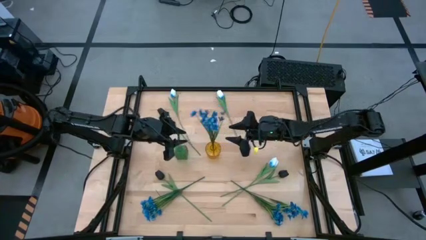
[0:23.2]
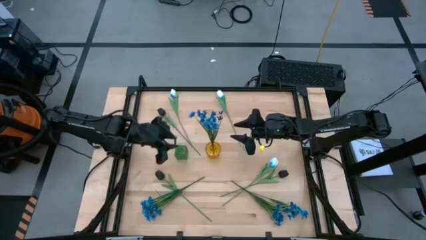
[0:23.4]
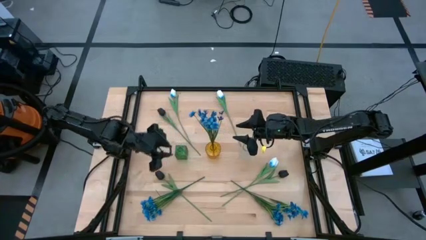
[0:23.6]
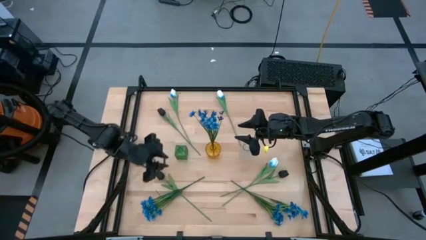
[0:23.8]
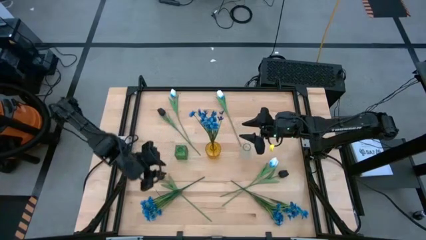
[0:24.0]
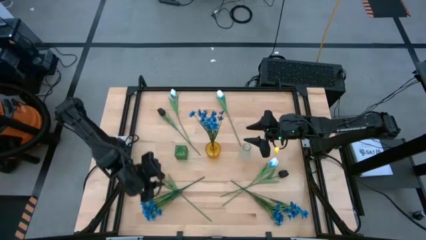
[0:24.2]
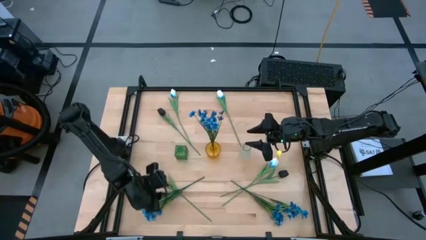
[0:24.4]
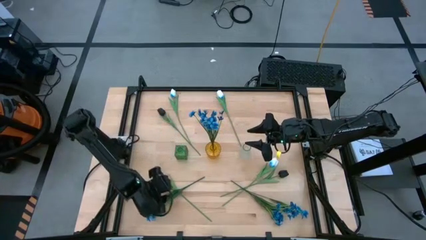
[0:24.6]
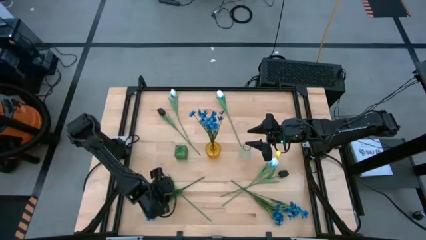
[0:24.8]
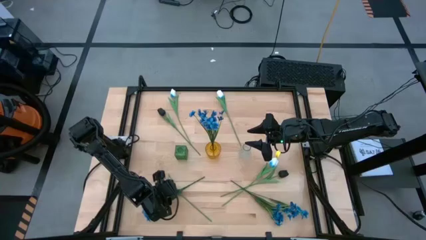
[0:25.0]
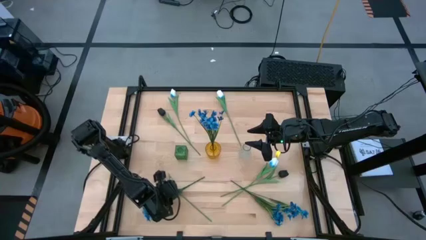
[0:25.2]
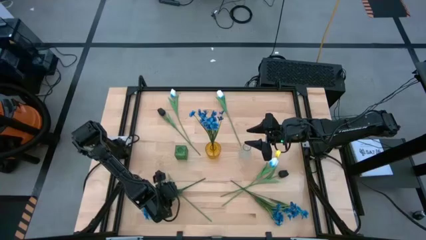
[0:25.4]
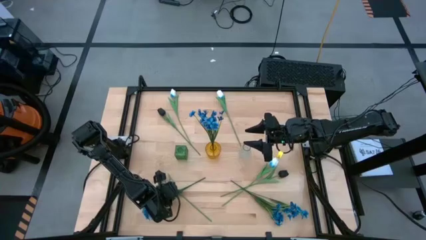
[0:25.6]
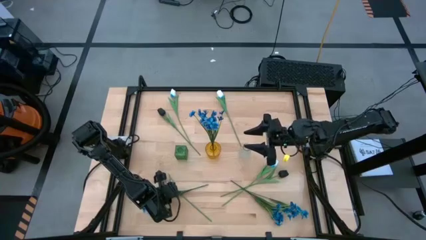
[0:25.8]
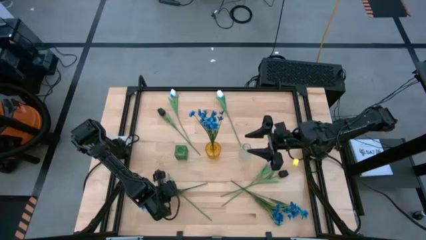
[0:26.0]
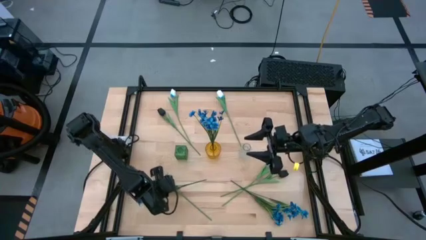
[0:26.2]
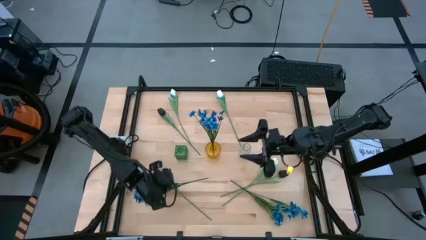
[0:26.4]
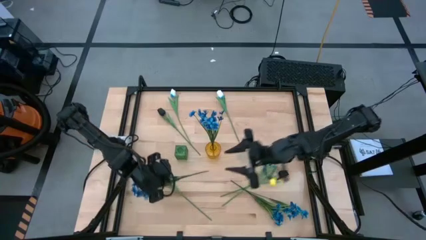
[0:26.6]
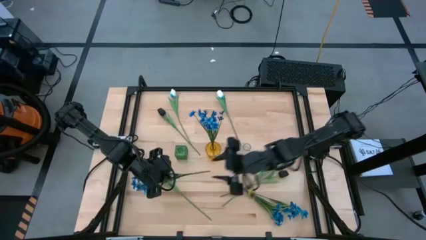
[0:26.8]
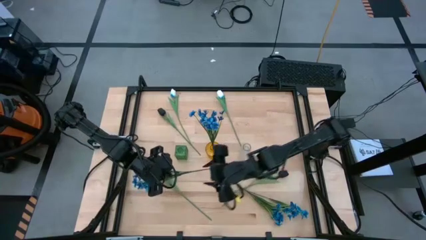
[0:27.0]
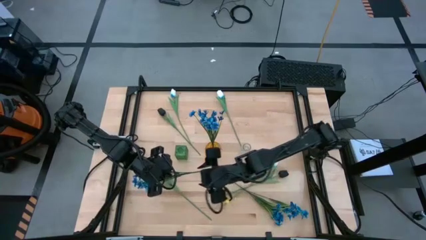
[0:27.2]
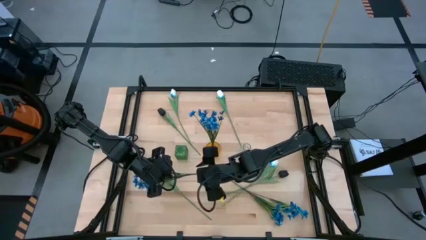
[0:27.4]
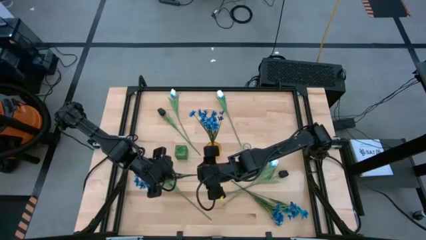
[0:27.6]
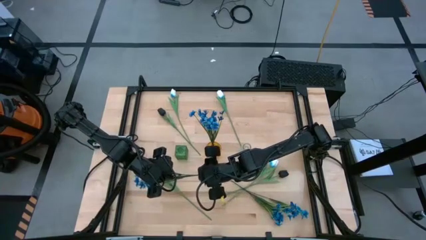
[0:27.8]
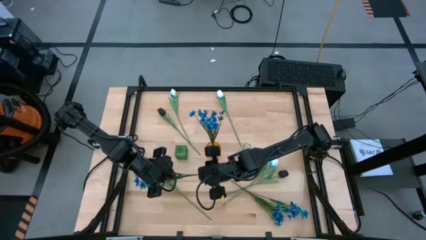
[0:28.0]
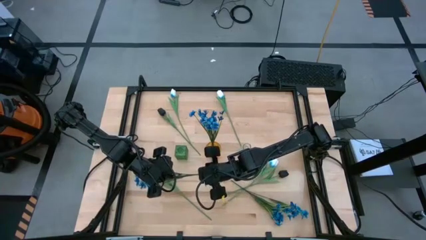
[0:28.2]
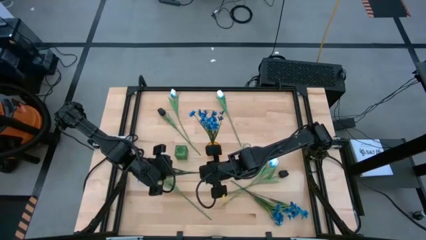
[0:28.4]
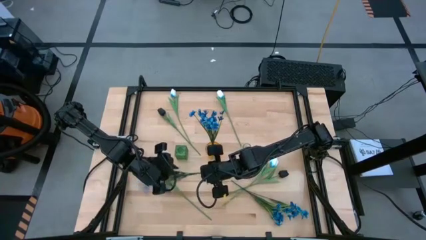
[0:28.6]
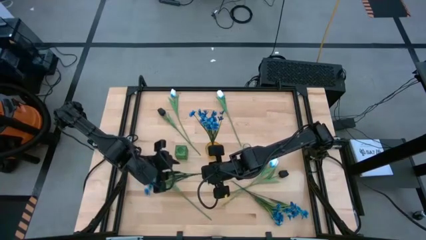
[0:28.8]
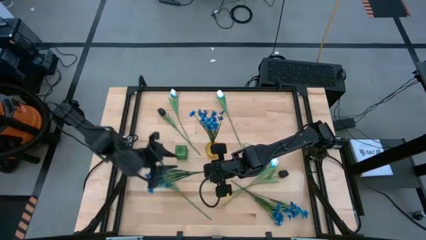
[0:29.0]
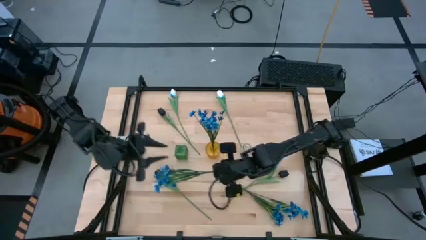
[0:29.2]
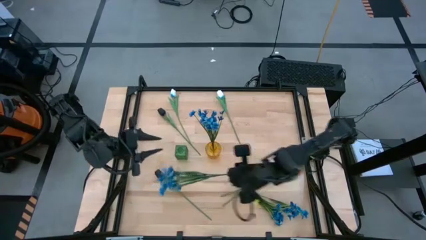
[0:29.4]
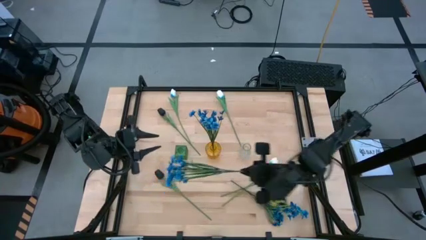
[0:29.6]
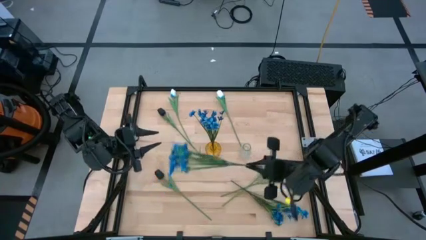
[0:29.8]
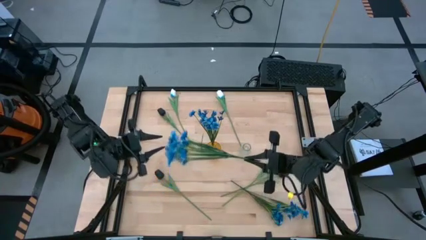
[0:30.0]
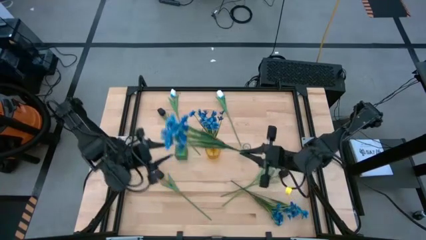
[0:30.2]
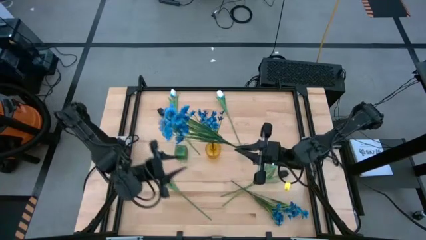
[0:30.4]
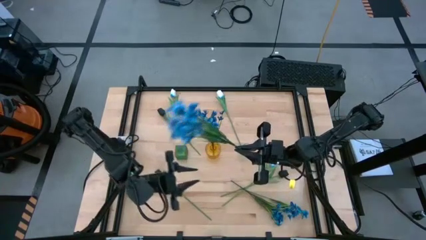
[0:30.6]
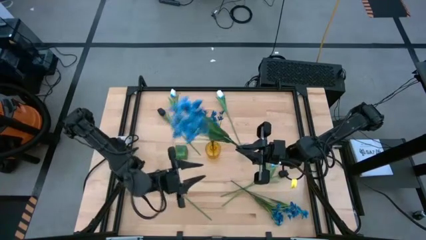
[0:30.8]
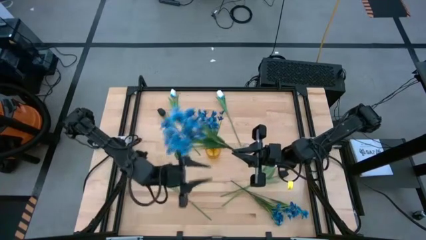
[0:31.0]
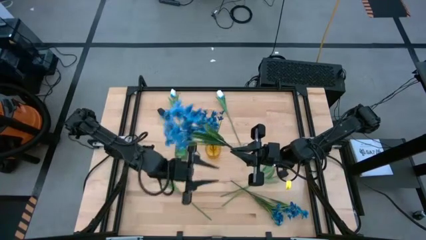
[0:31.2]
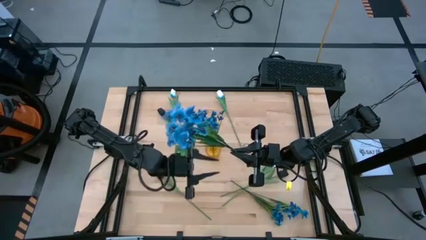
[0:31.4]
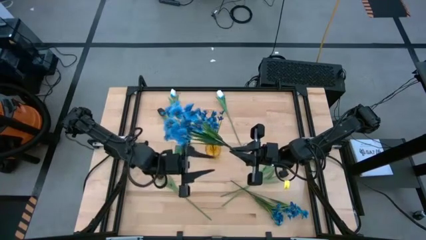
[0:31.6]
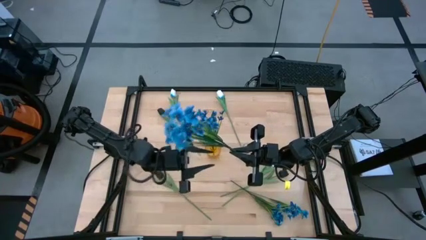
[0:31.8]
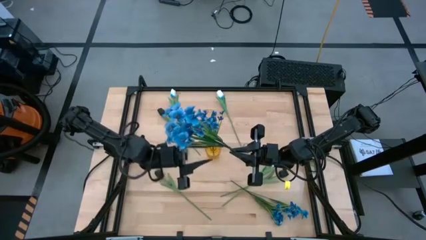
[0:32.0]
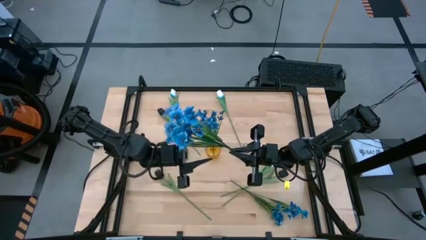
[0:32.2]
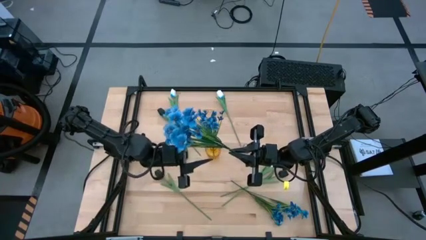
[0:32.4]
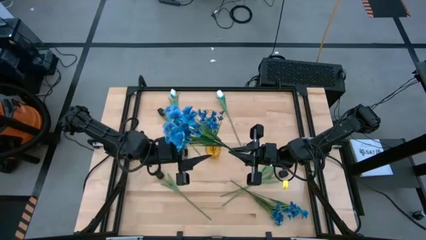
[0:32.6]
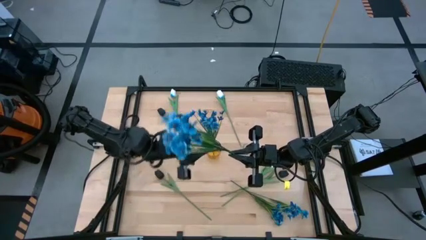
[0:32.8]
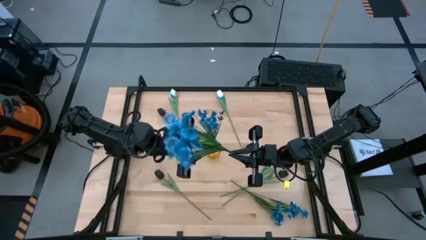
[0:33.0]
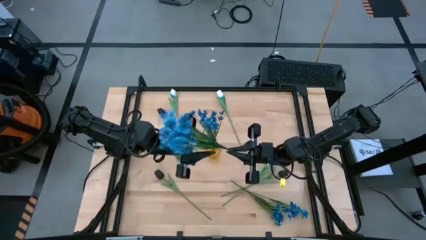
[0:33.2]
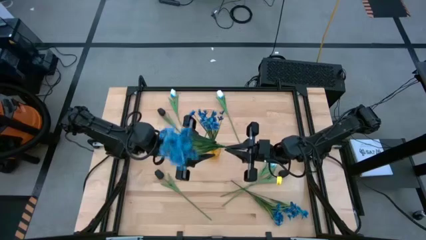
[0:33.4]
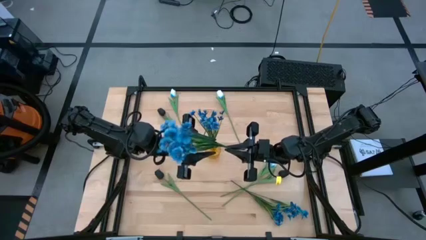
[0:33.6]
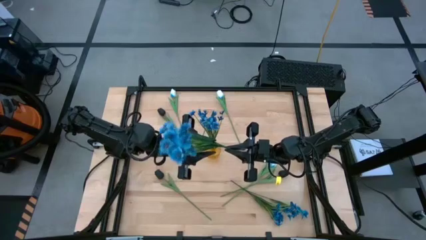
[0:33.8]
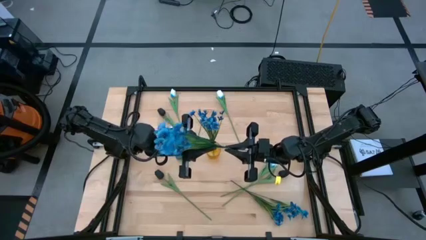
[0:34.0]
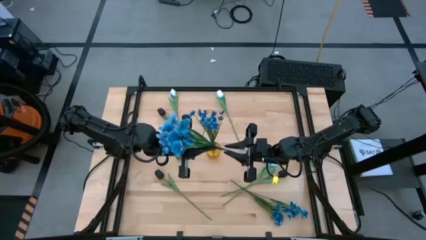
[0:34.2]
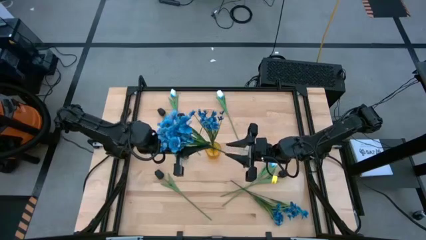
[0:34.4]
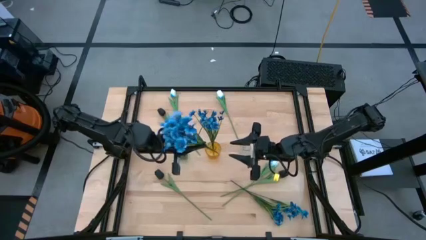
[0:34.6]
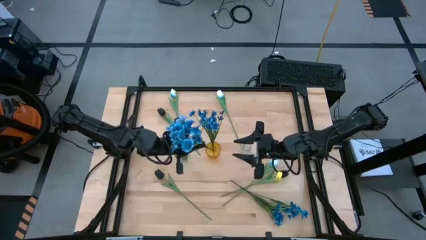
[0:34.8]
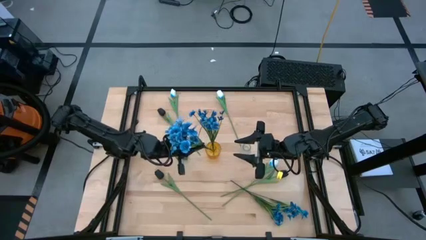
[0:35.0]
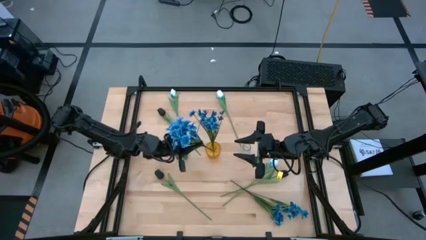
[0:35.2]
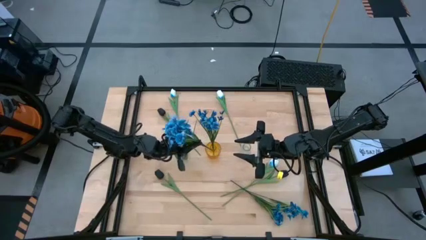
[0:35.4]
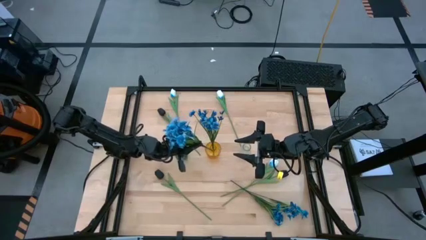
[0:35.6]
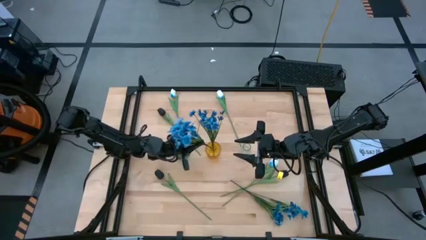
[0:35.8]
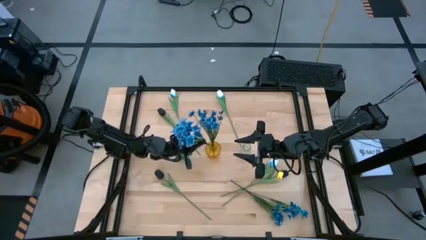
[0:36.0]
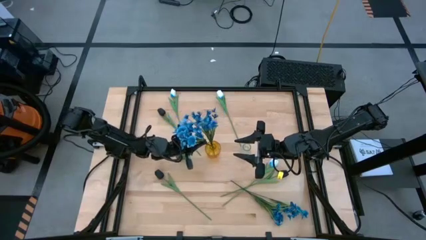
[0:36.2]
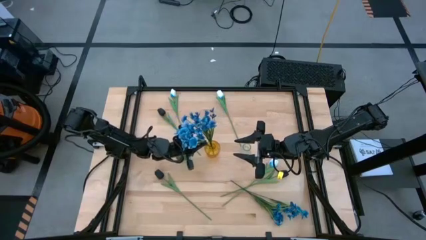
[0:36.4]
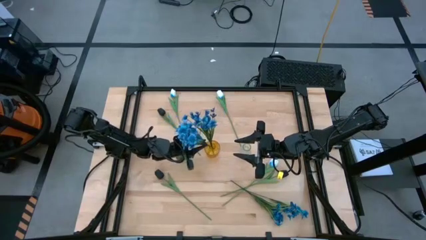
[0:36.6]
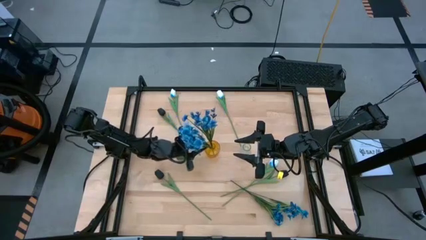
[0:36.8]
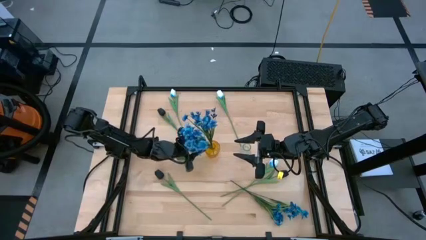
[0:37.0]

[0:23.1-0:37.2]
Task: Sort flowers into vase by color
Put the left blue flowers into the yellow vase
